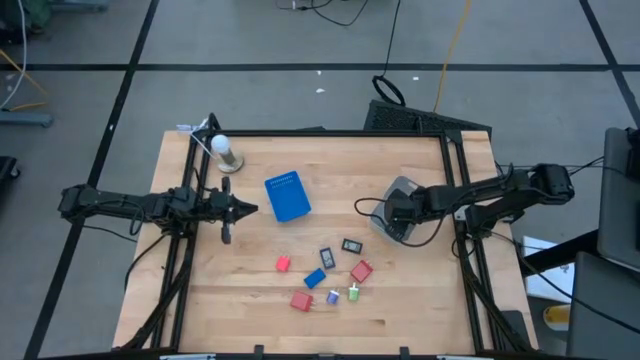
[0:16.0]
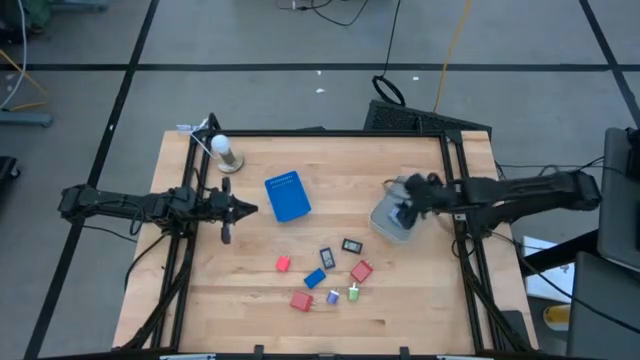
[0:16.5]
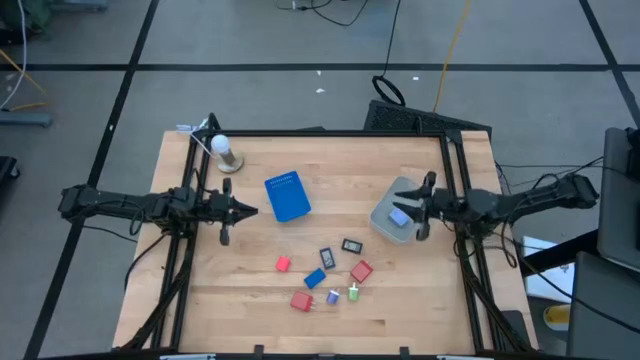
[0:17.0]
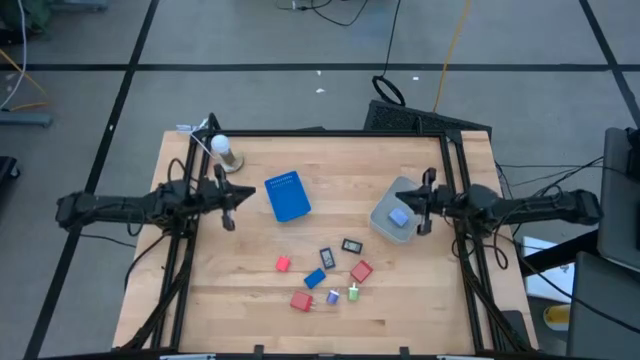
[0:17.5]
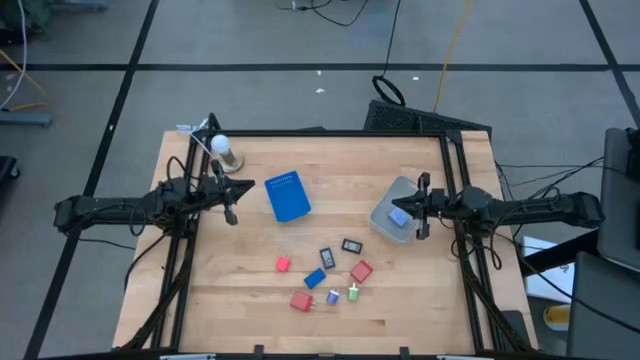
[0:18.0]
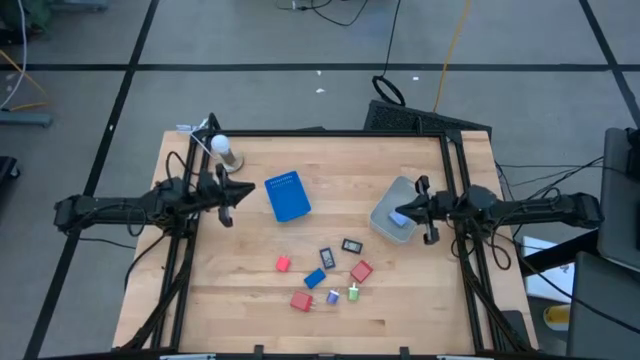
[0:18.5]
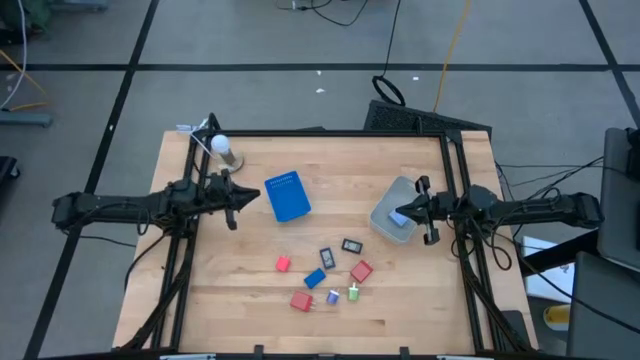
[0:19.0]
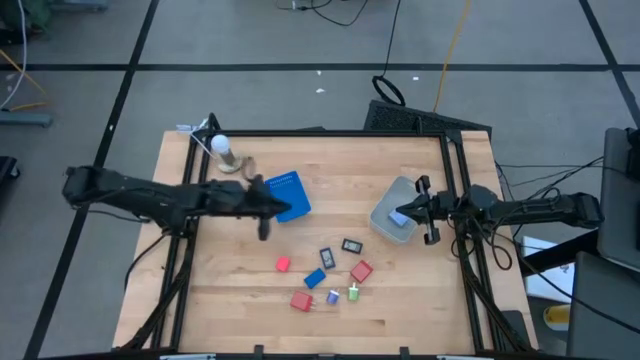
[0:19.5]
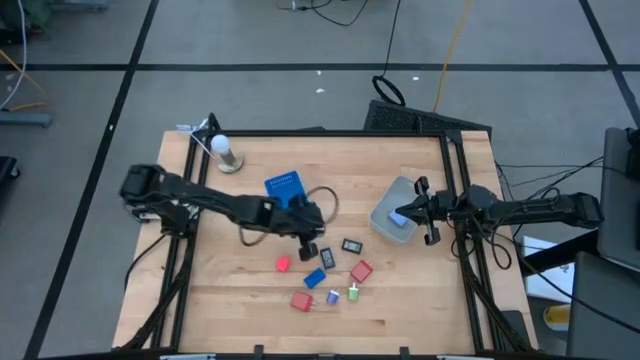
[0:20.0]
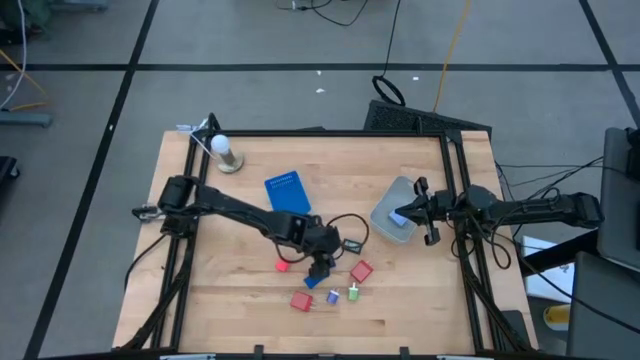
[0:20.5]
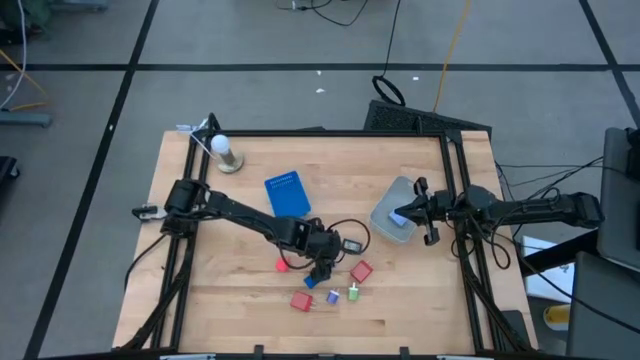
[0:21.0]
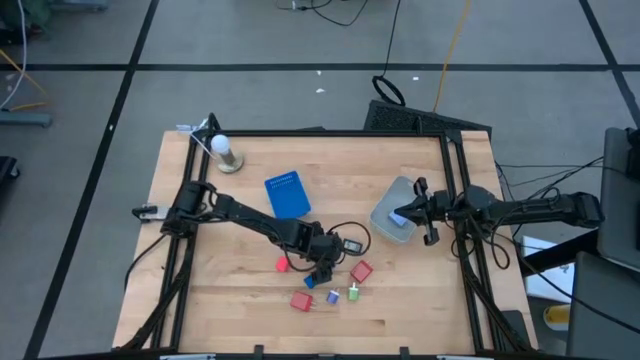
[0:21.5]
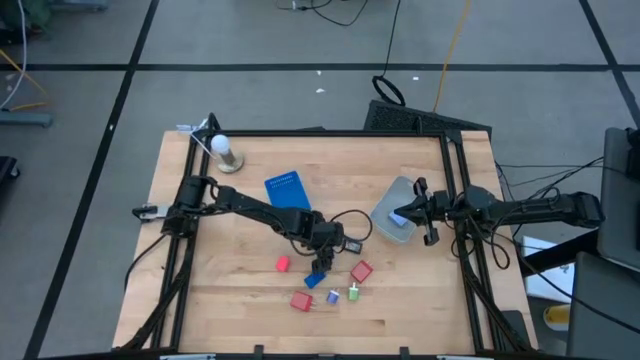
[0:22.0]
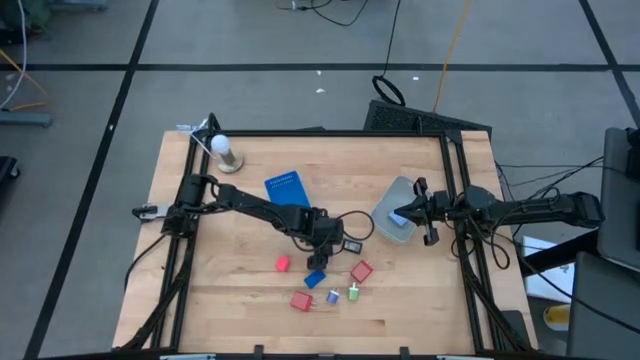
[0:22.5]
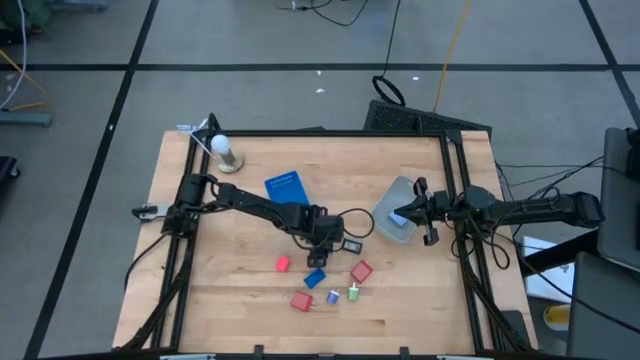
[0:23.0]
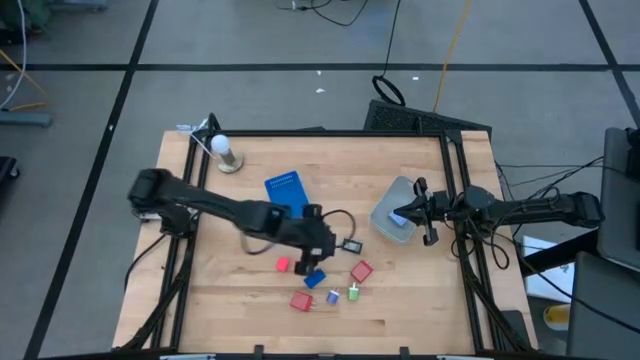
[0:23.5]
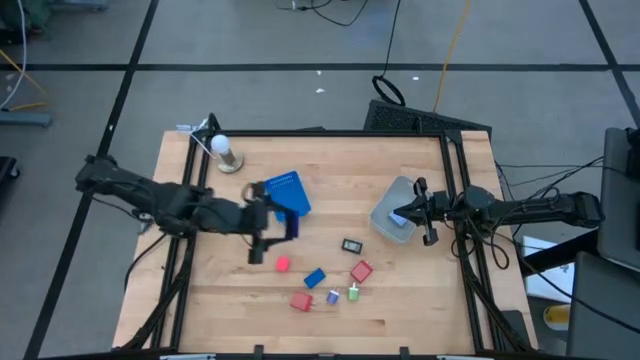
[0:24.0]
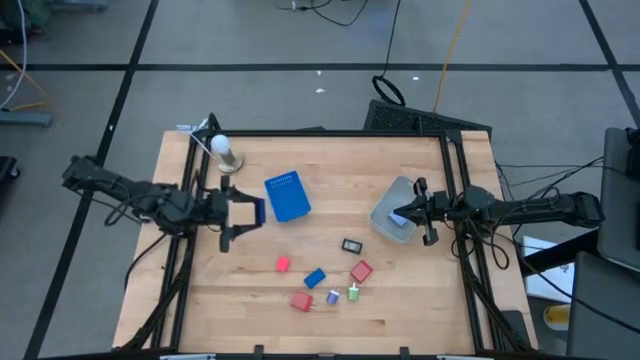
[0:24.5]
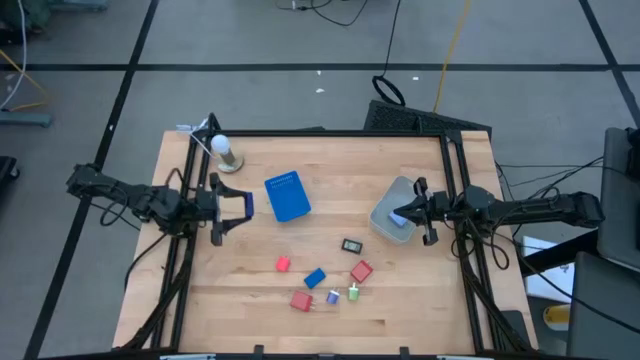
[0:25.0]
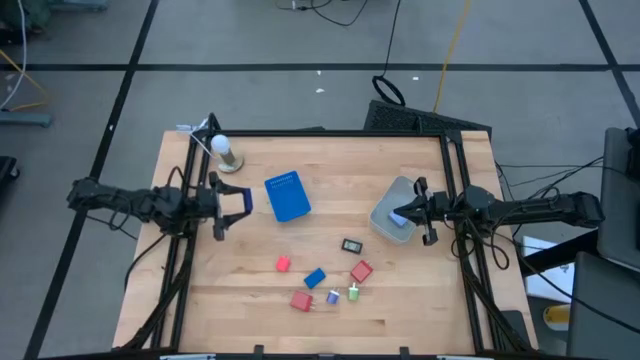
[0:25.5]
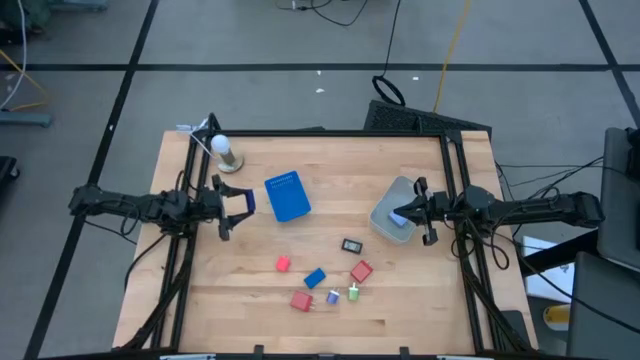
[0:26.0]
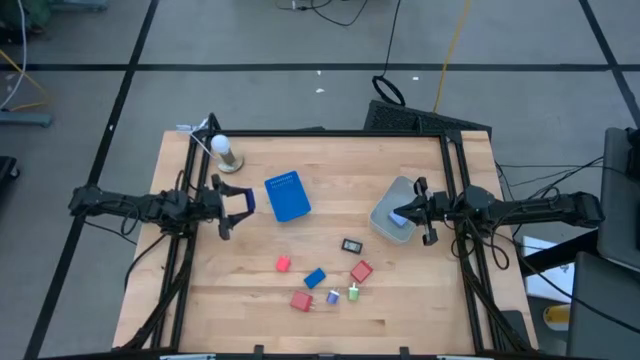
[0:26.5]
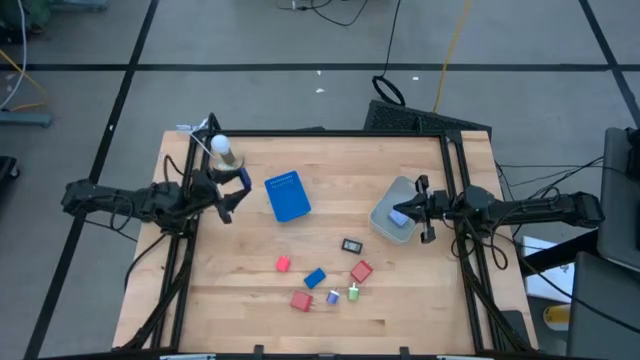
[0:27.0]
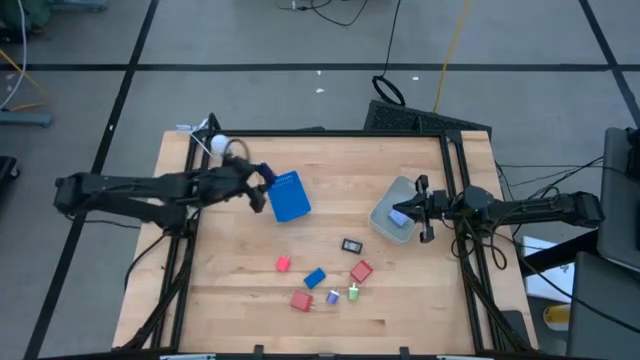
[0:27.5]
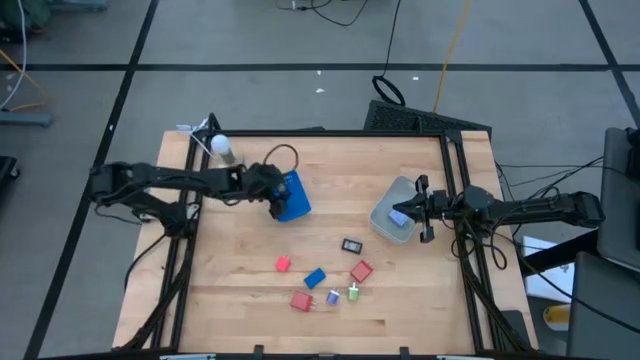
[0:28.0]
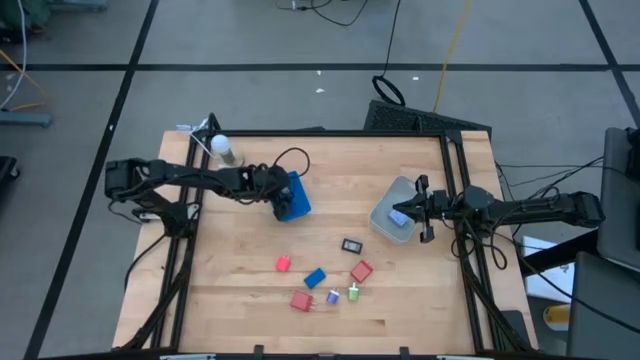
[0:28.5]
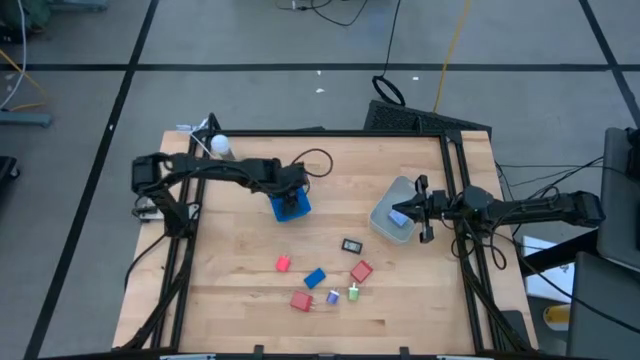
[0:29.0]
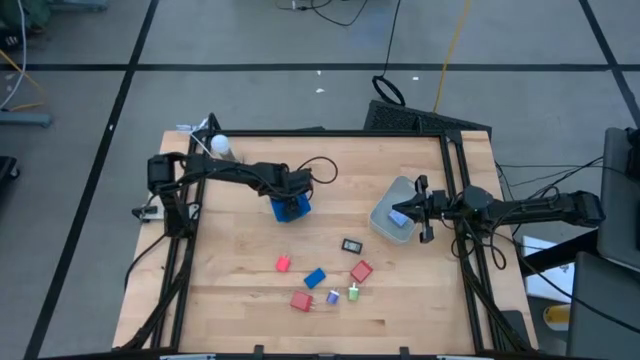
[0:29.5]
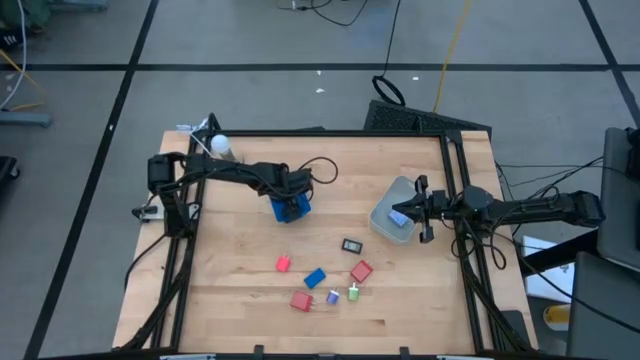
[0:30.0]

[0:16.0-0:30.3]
Task: Pick & Place Office items
Put the dark blue digital clock into the blue bin
